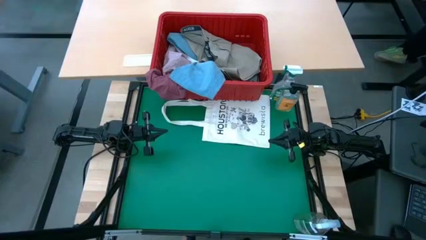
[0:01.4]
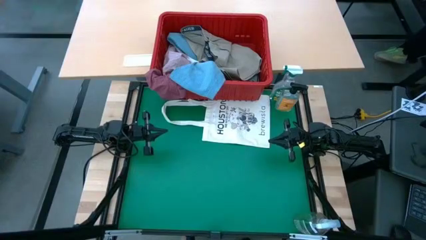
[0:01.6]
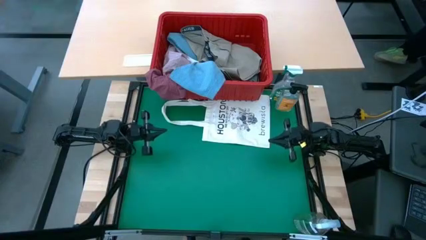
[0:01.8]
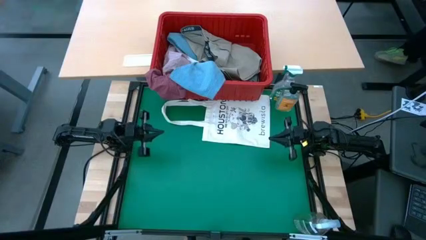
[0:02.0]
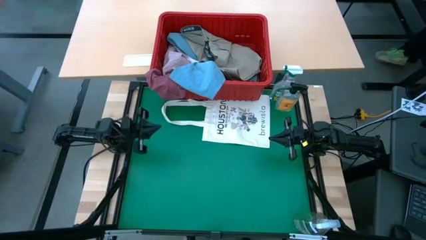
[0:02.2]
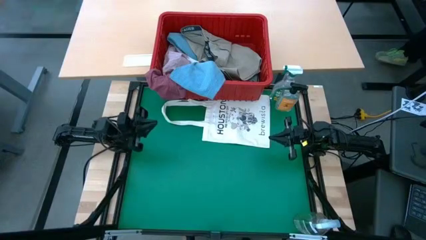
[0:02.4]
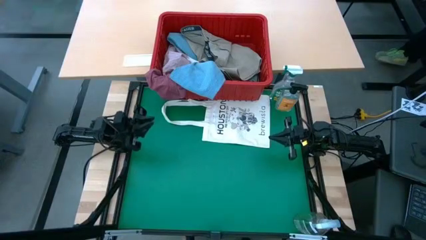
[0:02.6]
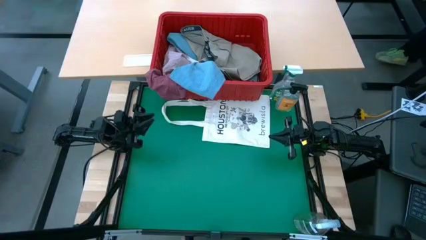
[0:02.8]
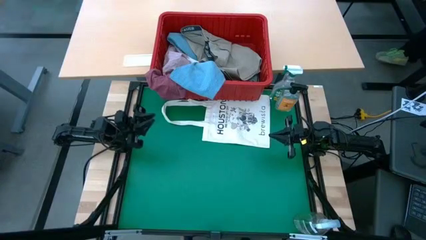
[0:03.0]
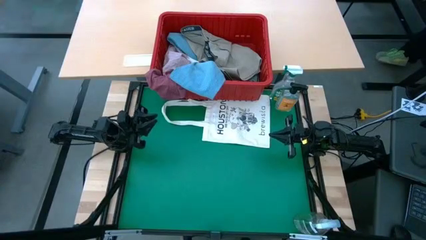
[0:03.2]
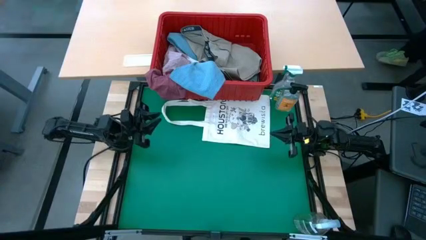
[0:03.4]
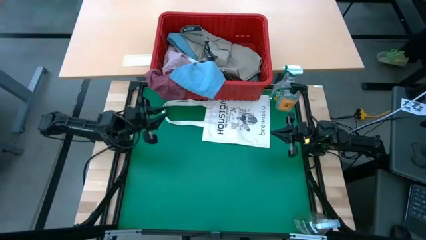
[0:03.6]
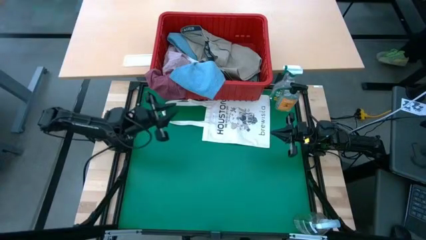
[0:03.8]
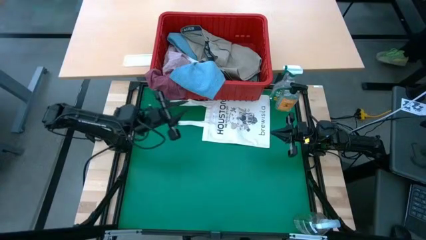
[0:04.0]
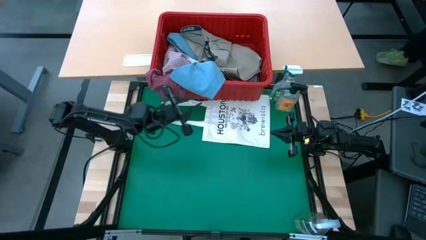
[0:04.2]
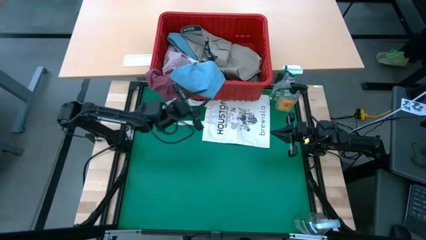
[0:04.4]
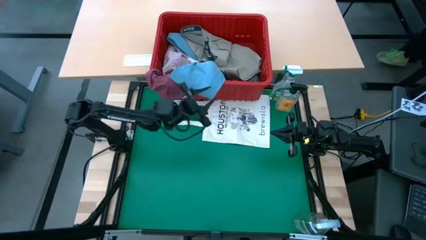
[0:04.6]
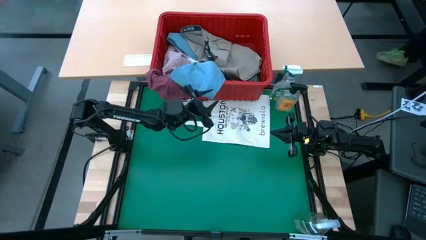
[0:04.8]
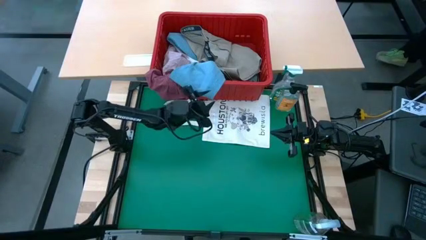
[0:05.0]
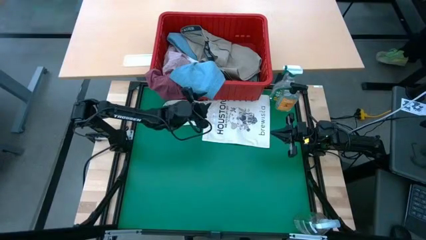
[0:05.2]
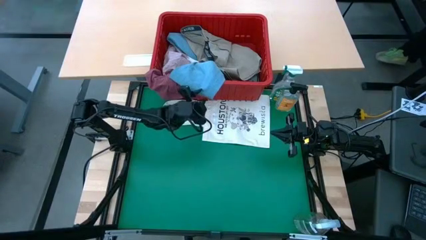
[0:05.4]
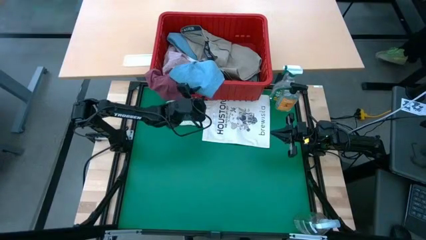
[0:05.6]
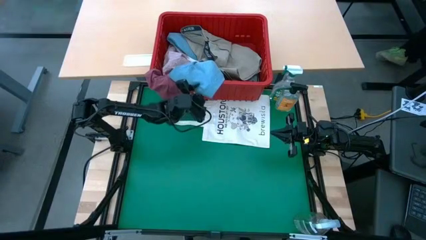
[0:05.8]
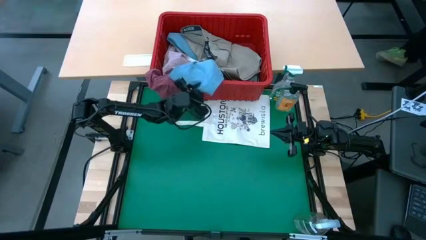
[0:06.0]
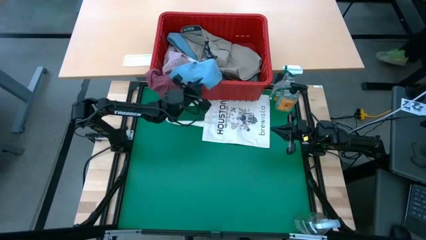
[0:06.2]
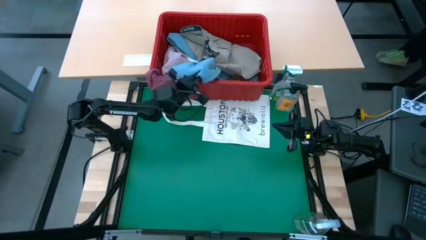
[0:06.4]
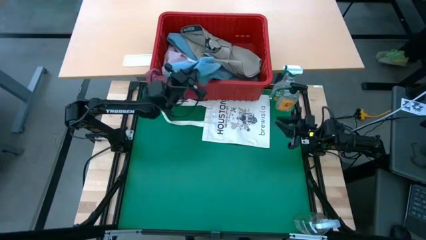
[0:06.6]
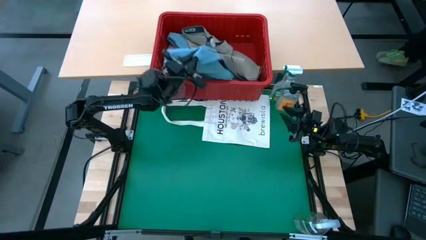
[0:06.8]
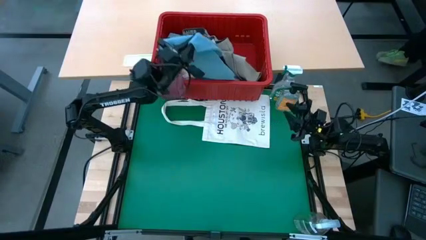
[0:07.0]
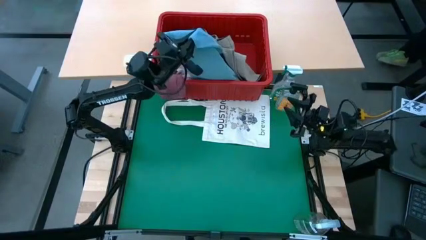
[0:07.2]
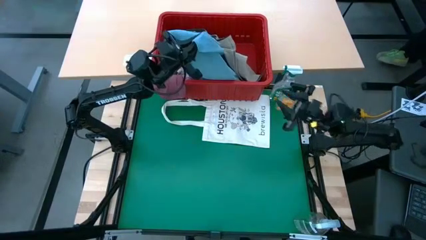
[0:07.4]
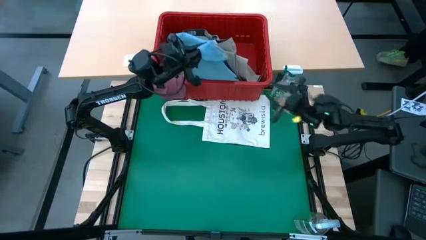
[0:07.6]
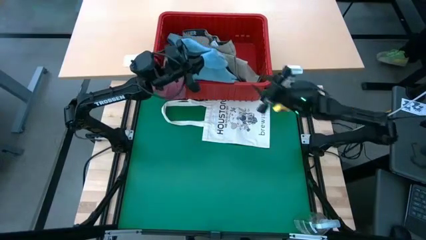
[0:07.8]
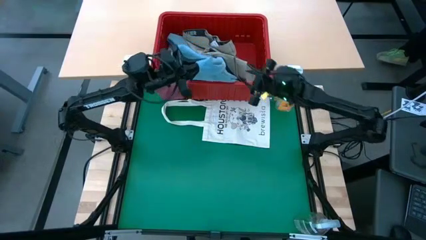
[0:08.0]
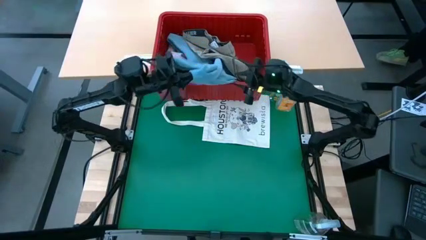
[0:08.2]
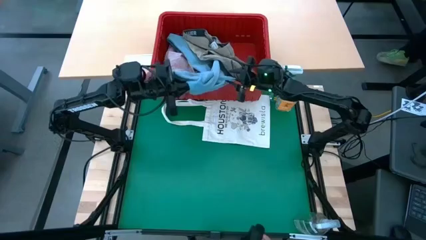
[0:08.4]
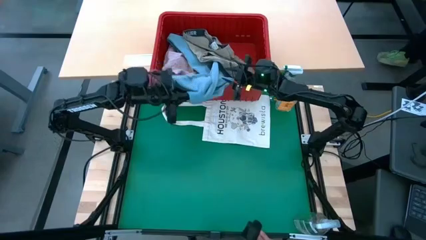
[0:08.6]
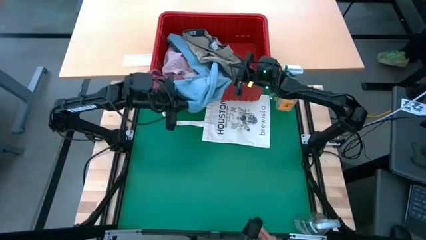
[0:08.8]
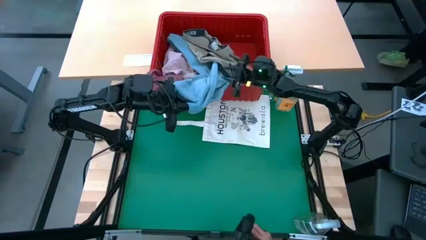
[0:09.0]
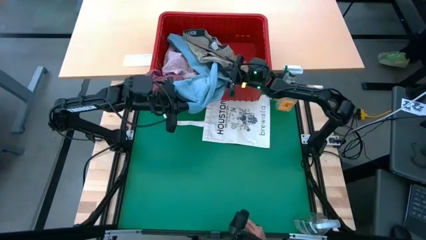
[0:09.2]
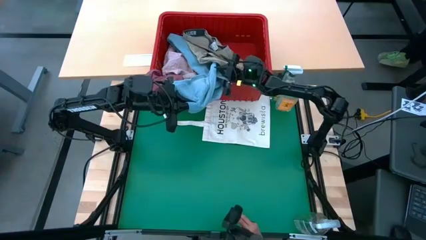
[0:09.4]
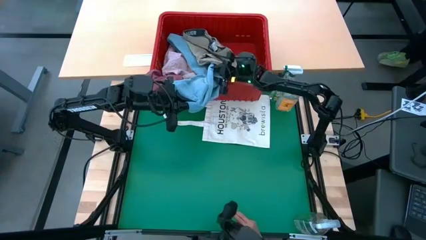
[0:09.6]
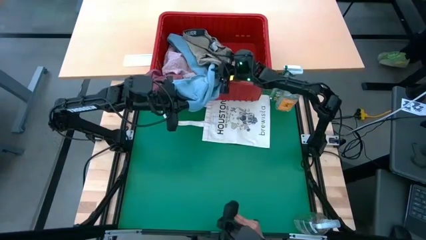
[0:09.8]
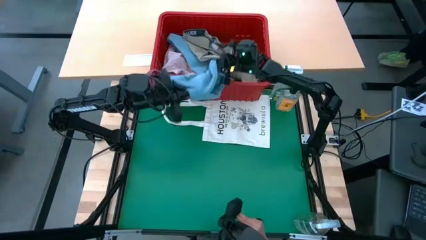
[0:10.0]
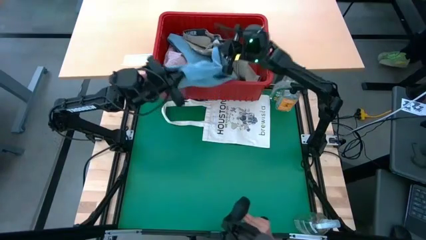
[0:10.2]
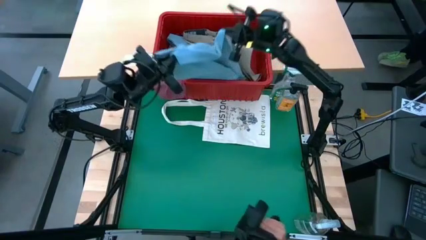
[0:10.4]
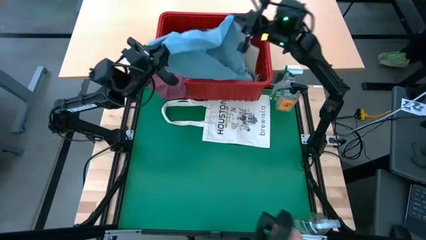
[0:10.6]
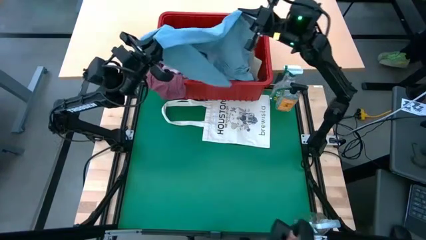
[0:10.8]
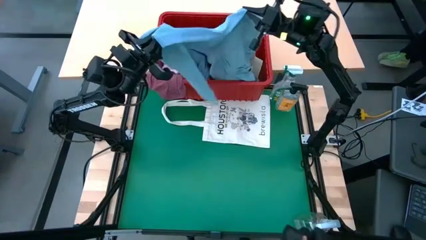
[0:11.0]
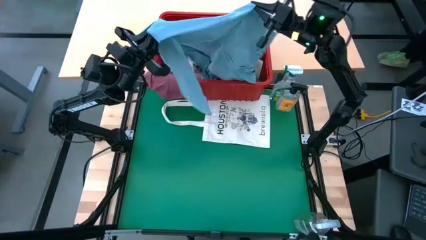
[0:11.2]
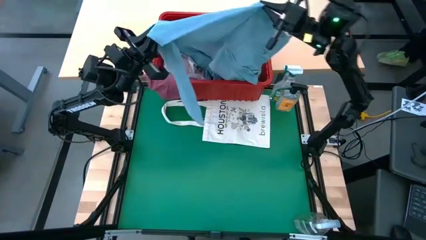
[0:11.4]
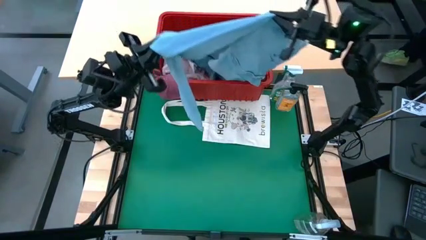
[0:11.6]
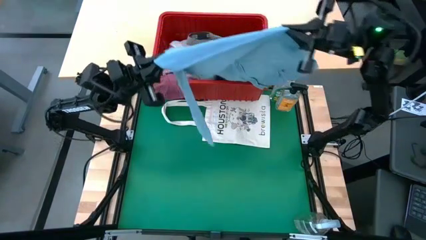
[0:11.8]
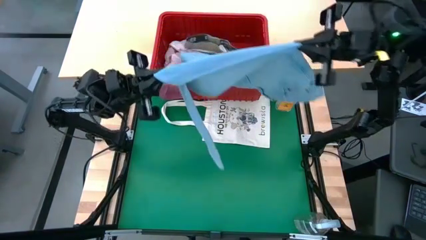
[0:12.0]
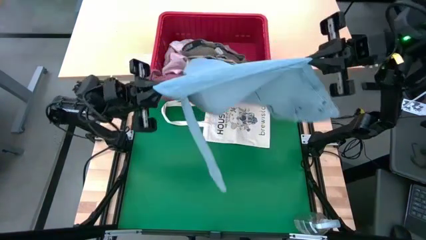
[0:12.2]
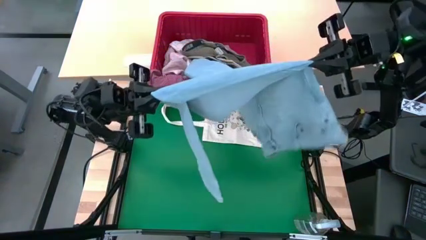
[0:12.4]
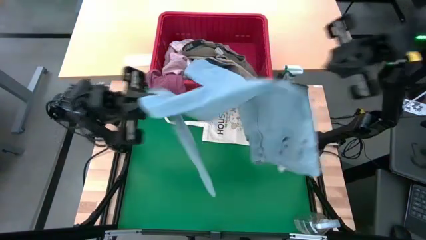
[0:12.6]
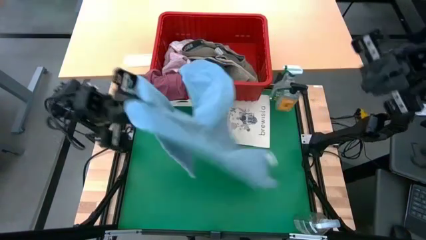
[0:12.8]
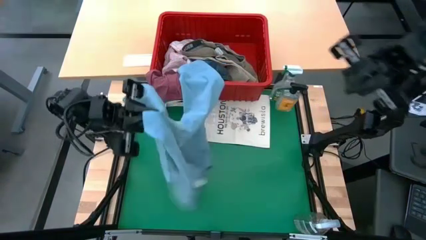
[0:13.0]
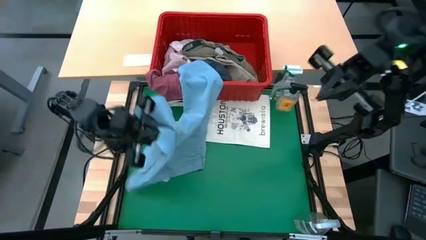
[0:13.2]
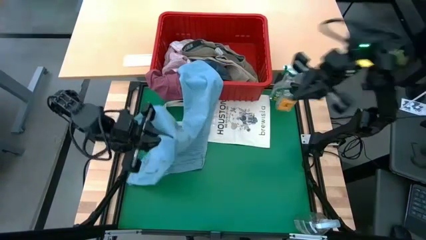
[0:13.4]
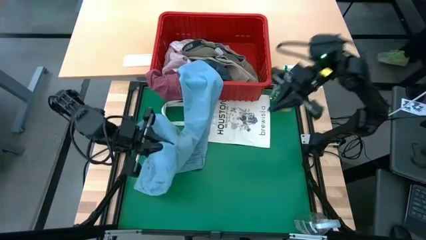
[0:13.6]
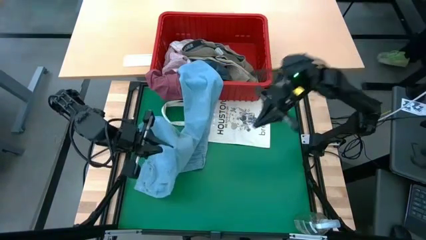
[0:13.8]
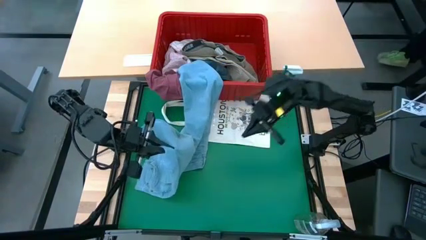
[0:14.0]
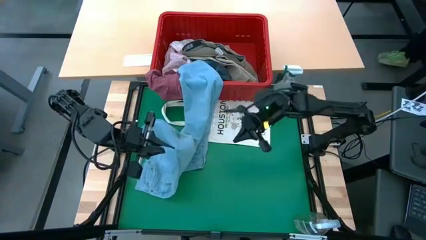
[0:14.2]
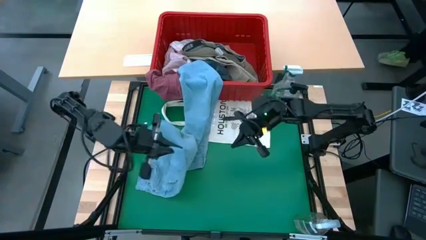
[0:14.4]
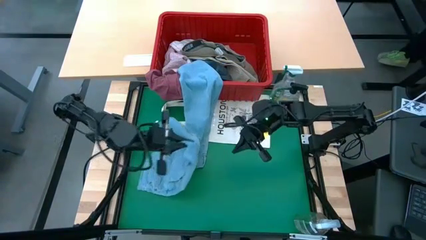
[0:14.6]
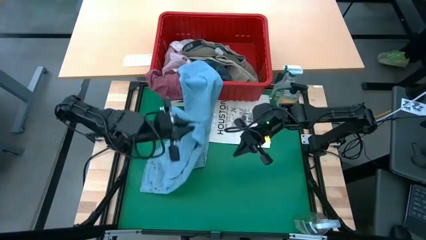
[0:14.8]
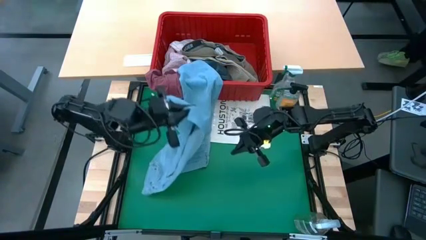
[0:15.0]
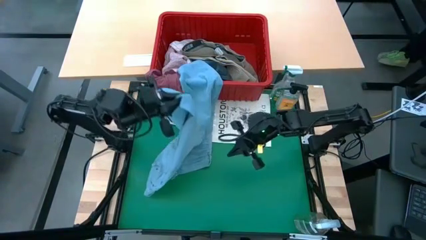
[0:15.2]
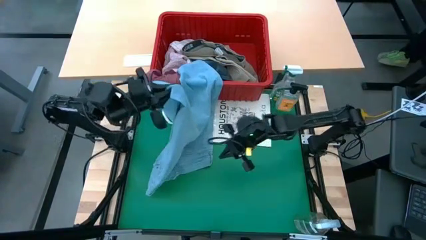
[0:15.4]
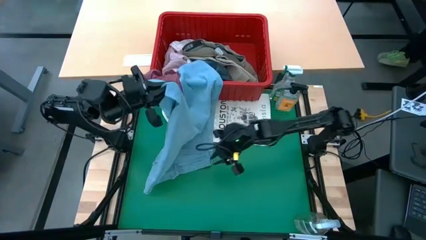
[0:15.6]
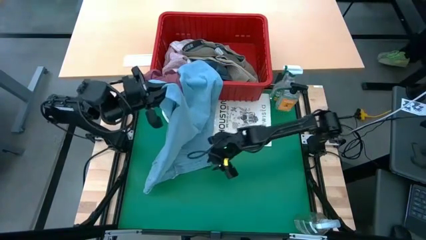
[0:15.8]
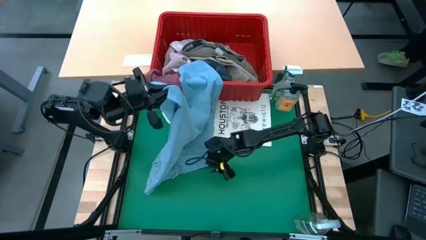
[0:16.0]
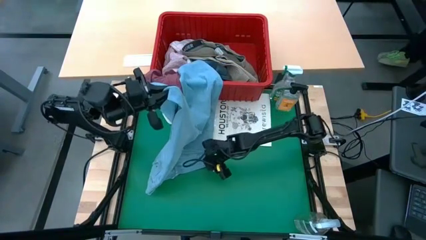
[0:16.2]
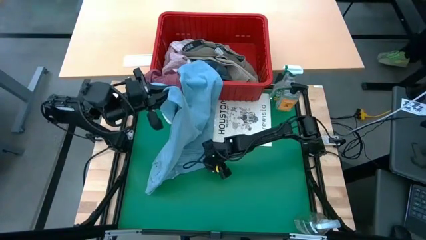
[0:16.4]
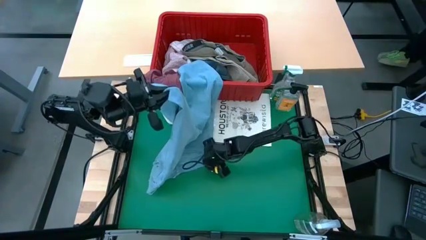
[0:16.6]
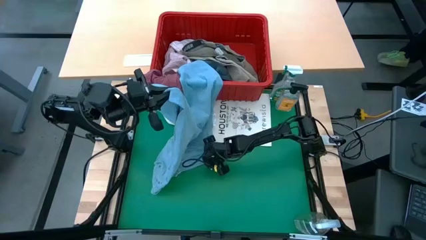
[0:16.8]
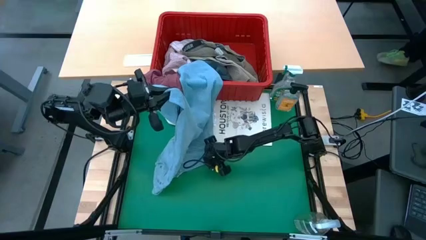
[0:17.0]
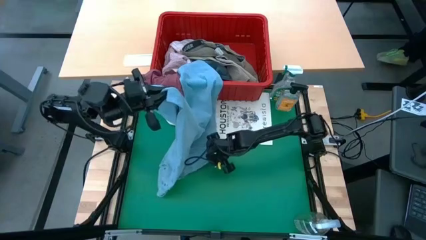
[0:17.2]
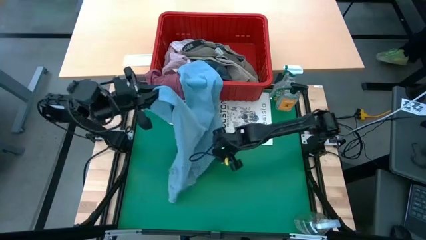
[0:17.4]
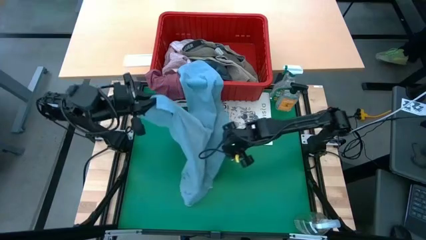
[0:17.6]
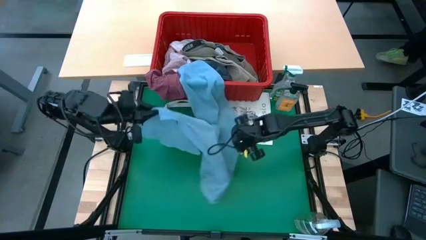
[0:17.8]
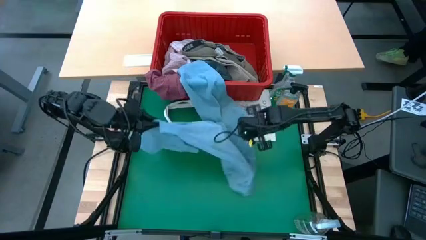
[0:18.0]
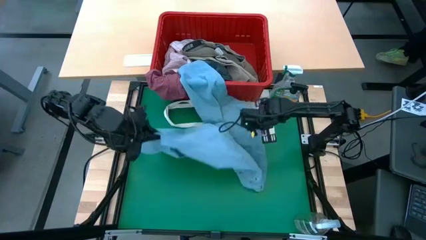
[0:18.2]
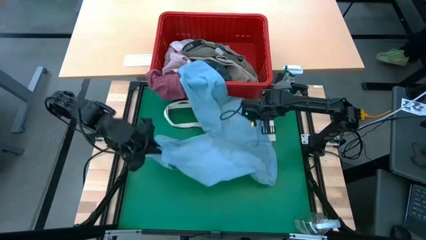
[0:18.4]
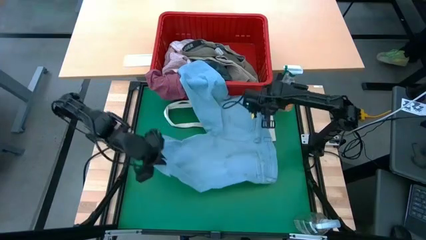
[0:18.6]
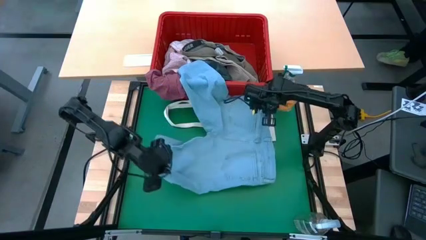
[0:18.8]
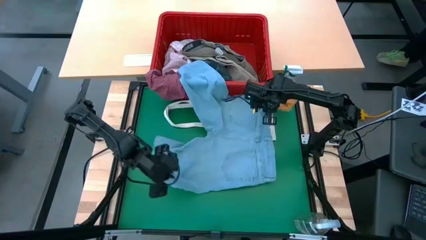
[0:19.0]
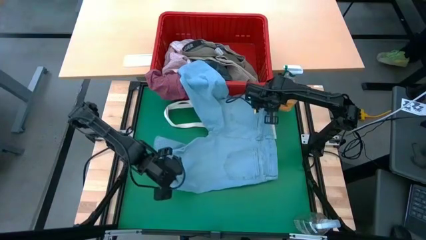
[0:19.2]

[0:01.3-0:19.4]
Task: Fold Laundry from Bin
Fold the blue pants from the red laundry basket
